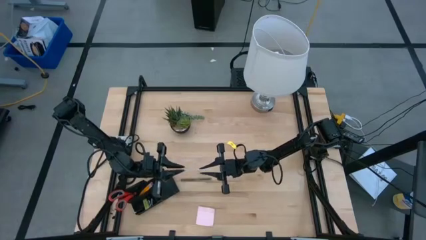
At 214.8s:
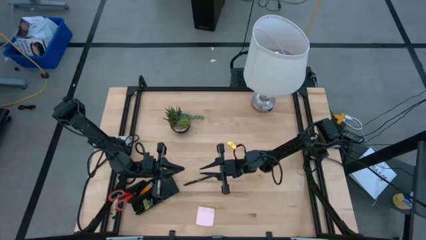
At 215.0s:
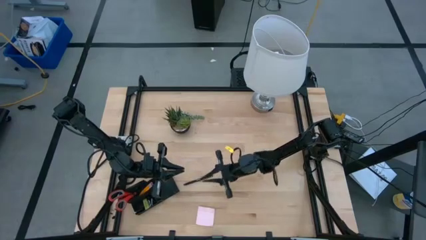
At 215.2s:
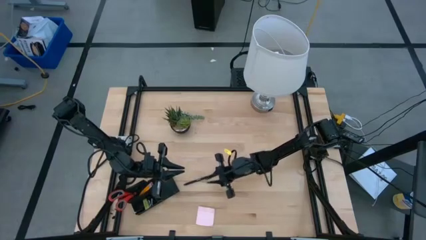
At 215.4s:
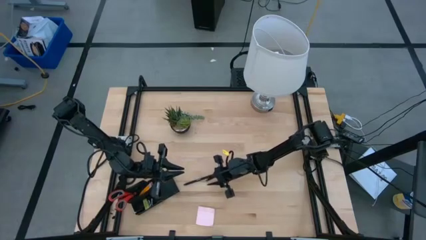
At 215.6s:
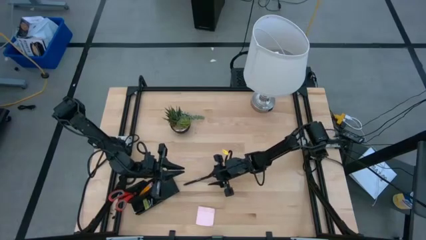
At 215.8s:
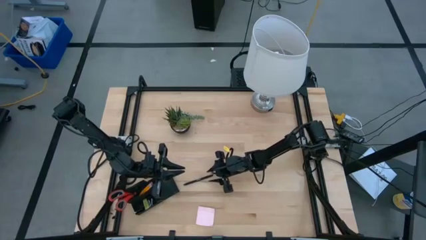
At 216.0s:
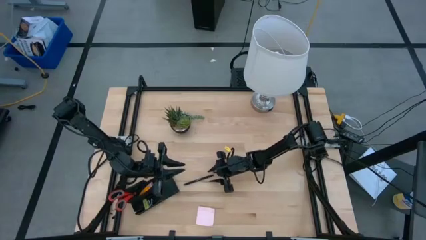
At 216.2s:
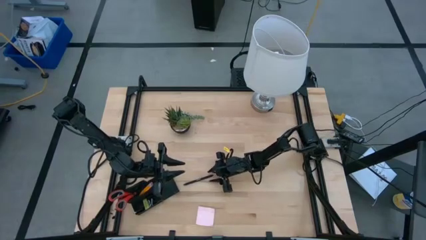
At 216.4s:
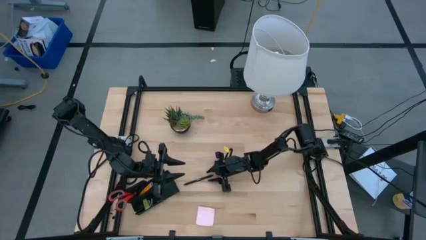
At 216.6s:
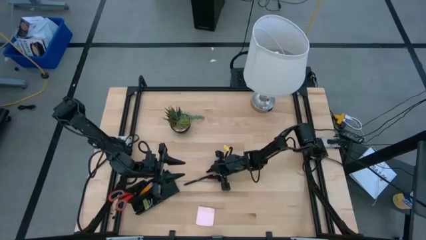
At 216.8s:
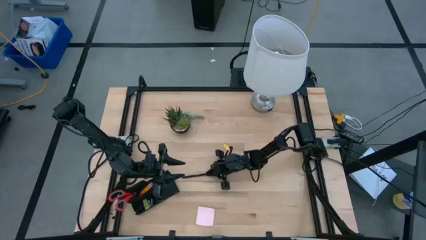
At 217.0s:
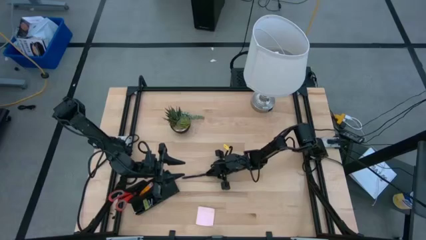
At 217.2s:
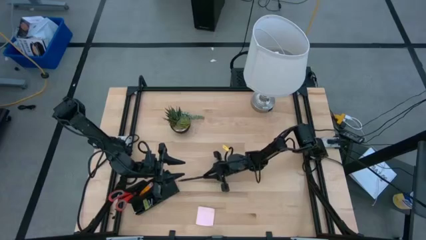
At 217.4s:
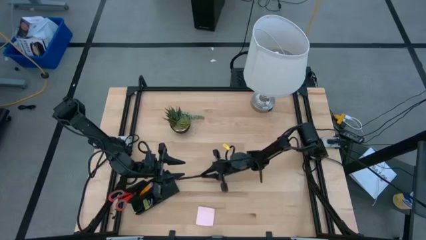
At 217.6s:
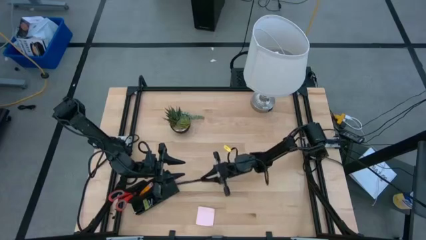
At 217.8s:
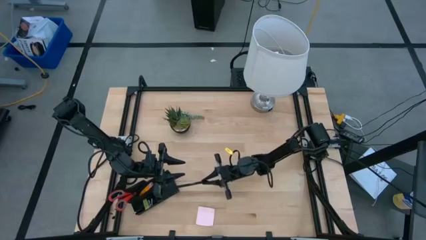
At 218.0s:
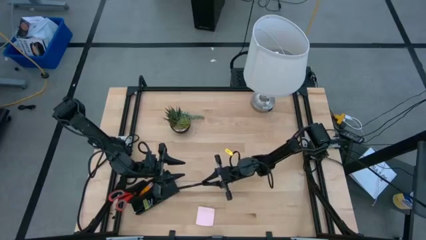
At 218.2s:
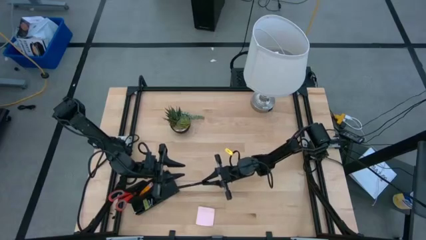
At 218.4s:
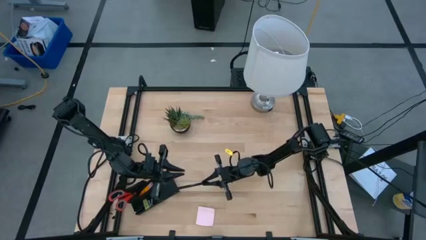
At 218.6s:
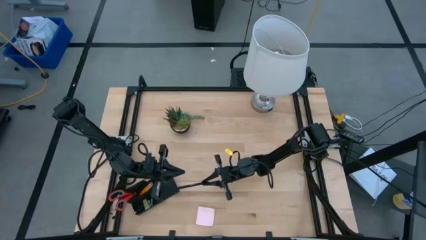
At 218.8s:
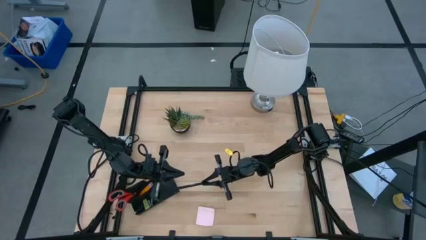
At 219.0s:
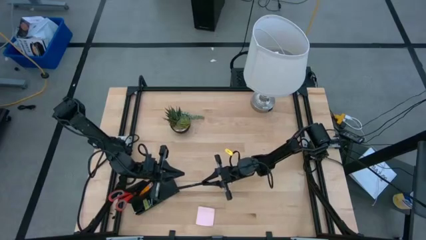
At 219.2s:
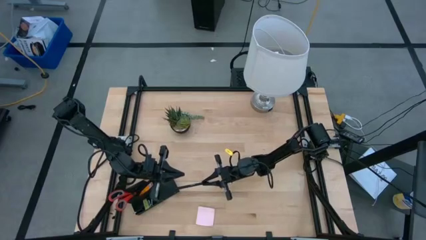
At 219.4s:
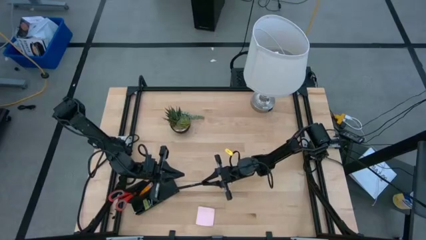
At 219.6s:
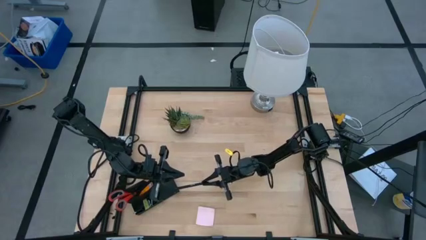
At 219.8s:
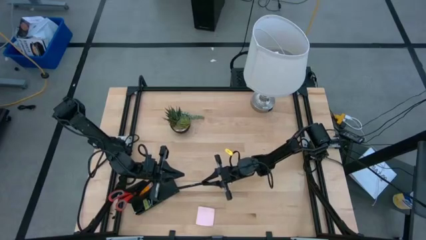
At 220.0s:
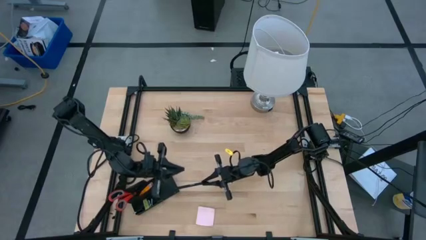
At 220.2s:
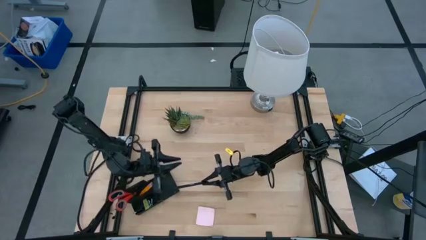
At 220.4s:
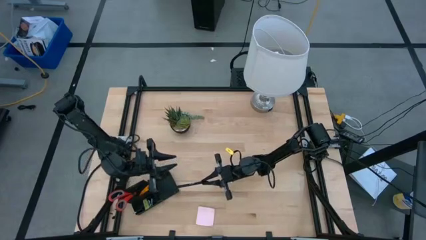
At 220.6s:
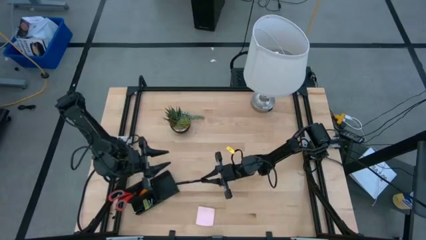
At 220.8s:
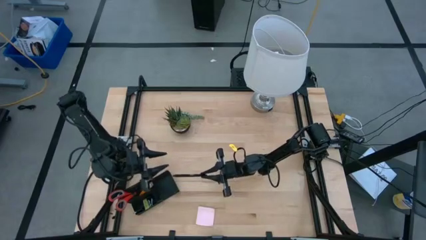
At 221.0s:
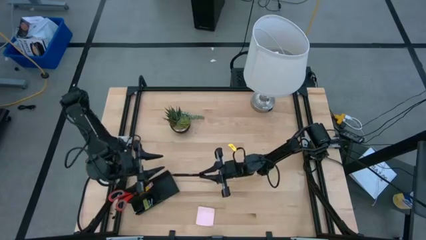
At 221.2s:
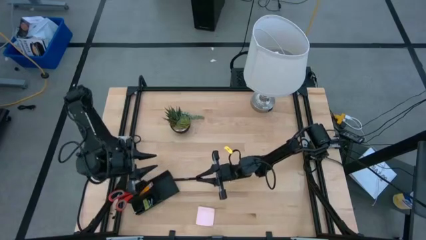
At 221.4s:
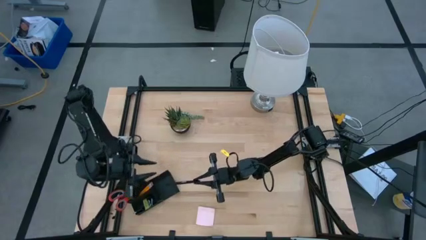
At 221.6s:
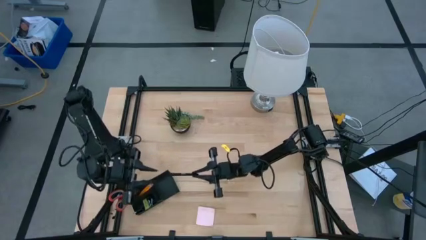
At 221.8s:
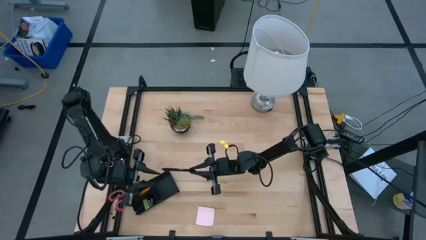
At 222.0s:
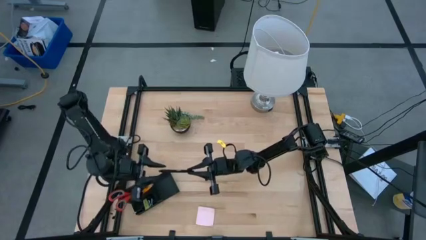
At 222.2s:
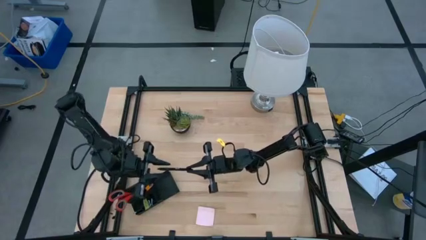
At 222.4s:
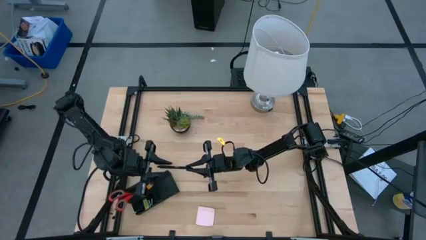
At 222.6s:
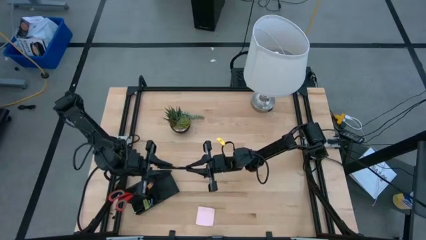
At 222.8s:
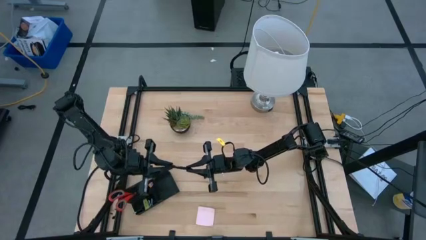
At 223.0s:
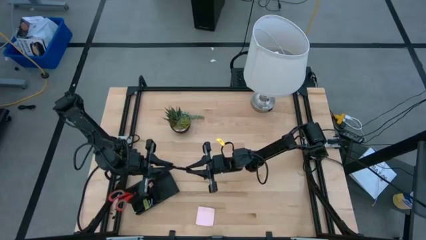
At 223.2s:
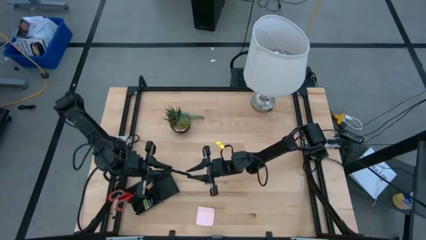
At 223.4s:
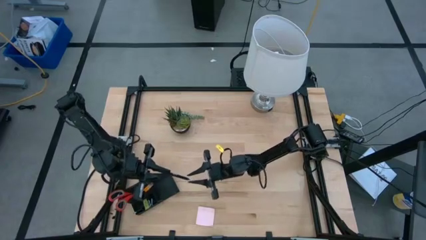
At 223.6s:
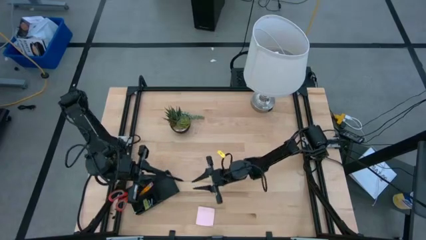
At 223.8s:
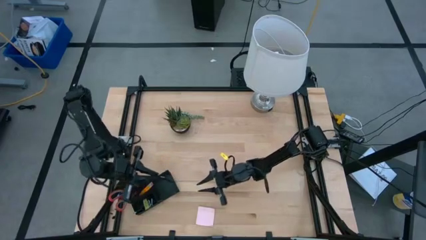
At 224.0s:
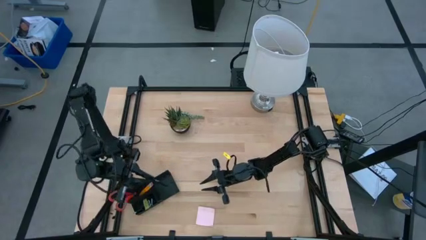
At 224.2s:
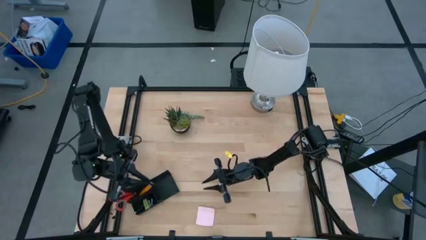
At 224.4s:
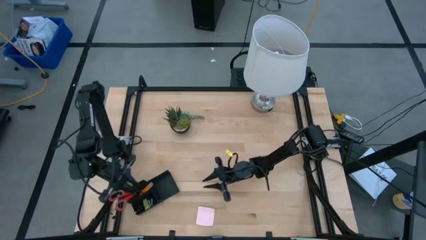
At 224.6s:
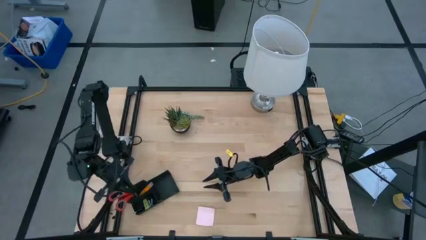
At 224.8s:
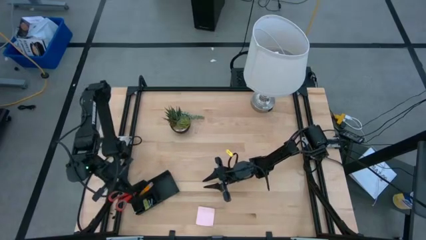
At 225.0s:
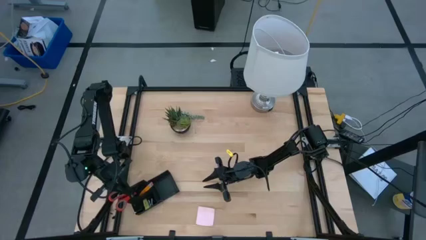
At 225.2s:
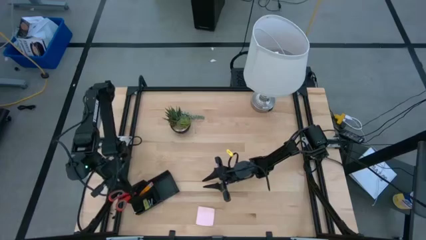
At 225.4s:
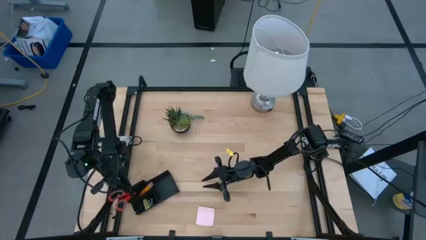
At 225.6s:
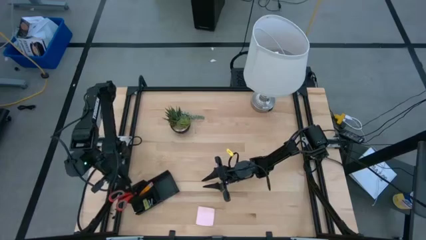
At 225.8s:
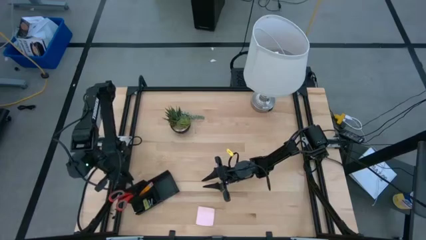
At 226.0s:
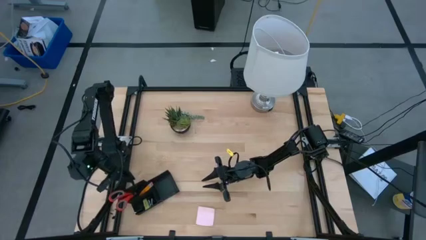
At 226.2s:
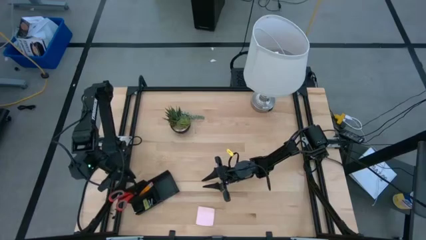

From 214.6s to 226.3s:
Task: Pick and place office supplies into organizer
Put the pen into the top left section of the desk organizer

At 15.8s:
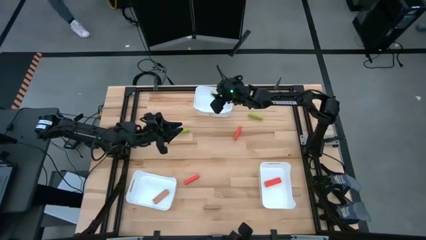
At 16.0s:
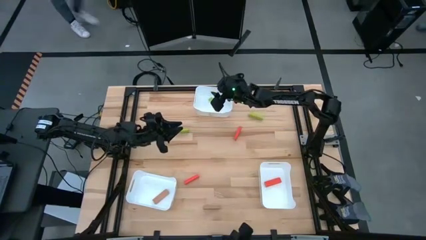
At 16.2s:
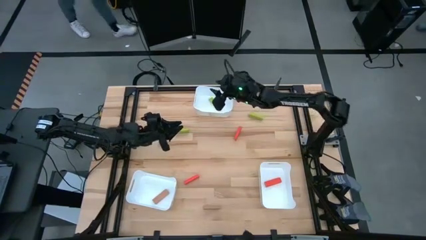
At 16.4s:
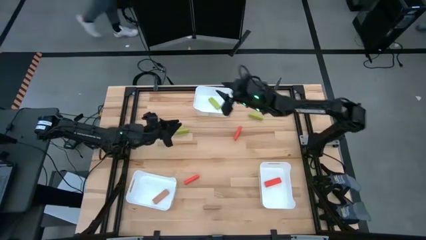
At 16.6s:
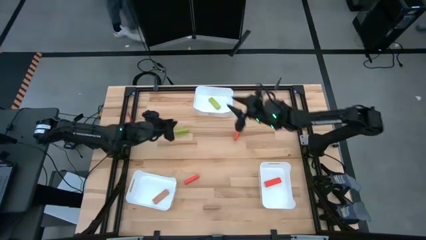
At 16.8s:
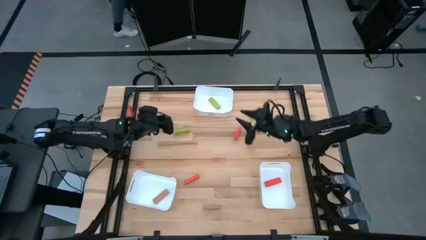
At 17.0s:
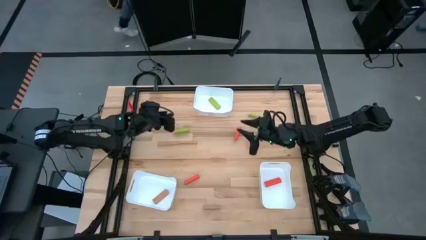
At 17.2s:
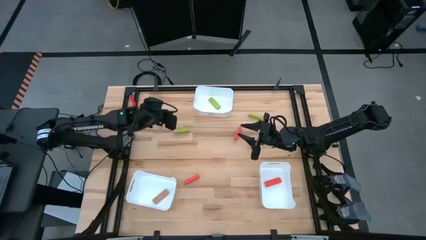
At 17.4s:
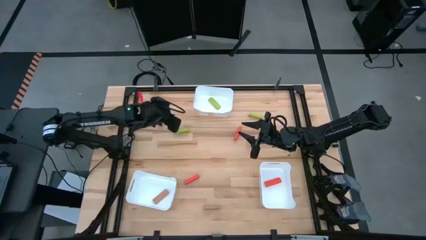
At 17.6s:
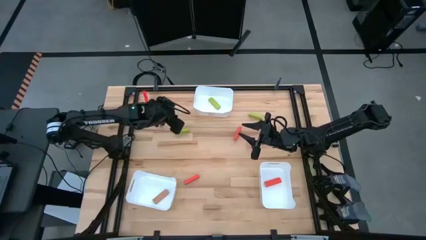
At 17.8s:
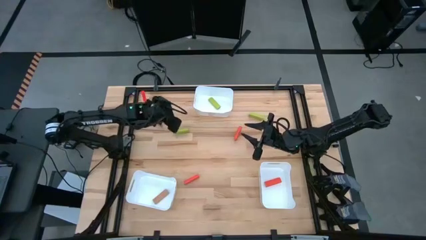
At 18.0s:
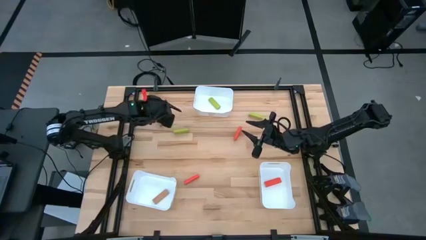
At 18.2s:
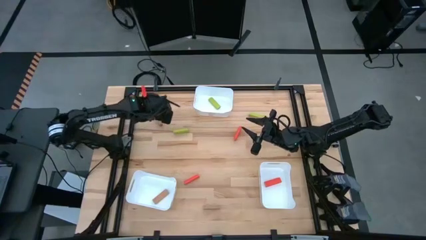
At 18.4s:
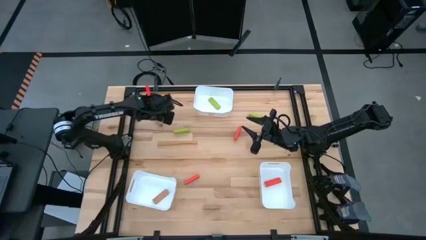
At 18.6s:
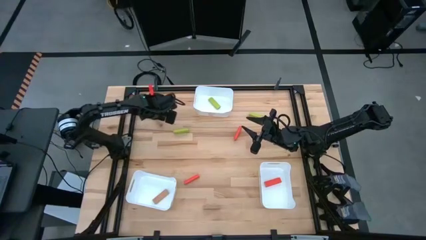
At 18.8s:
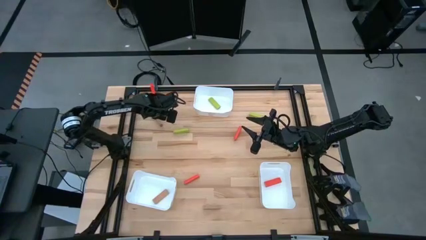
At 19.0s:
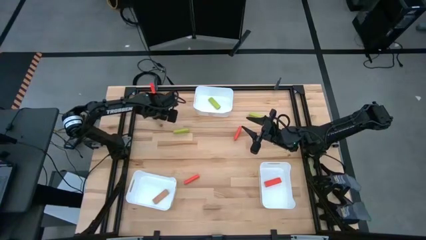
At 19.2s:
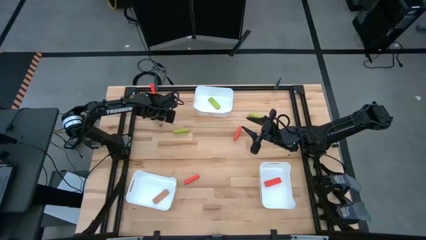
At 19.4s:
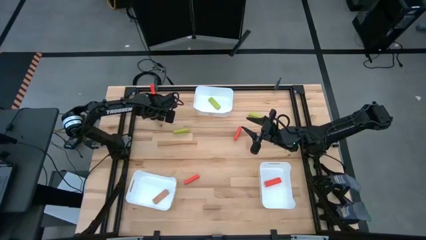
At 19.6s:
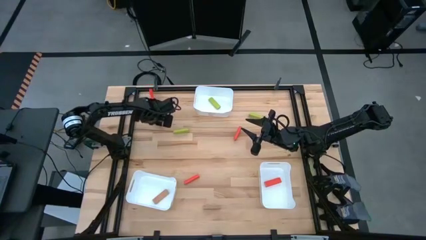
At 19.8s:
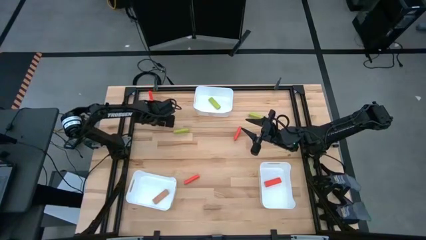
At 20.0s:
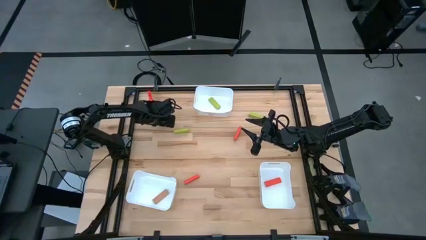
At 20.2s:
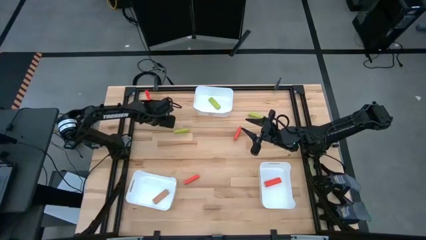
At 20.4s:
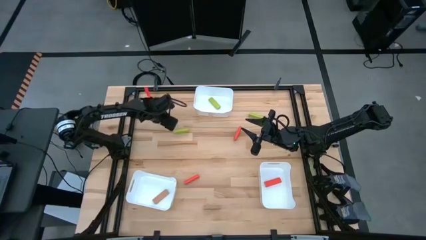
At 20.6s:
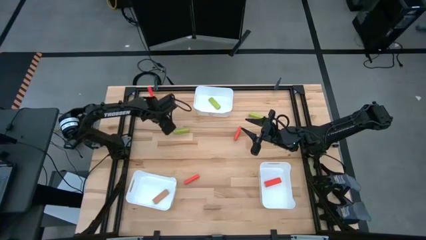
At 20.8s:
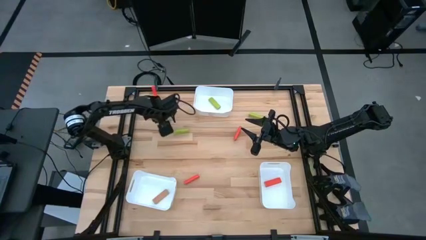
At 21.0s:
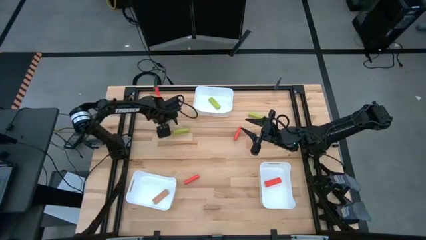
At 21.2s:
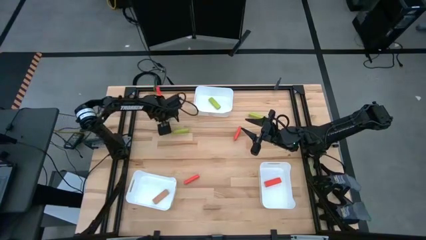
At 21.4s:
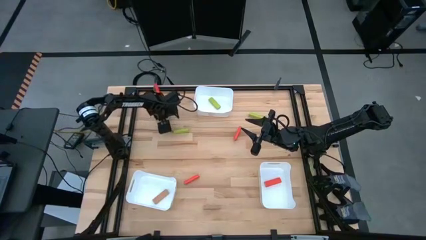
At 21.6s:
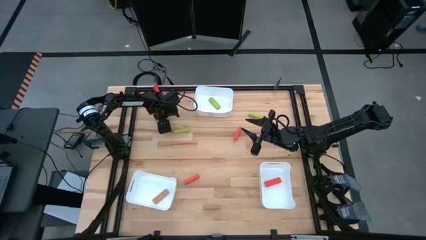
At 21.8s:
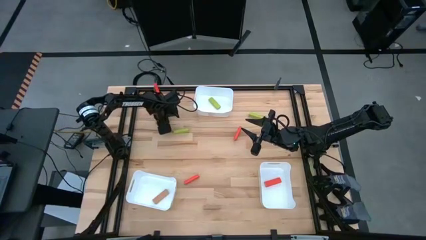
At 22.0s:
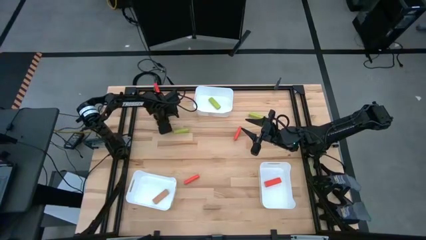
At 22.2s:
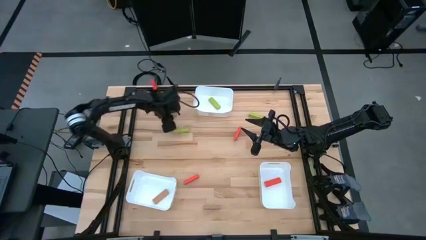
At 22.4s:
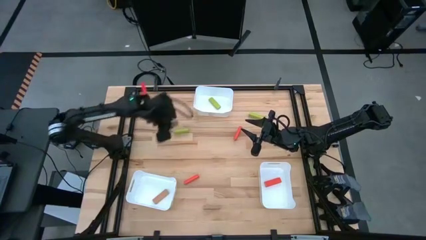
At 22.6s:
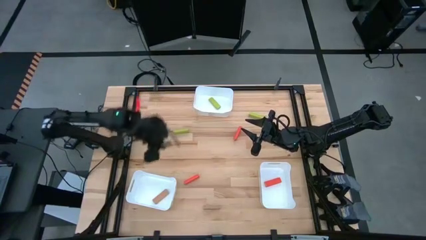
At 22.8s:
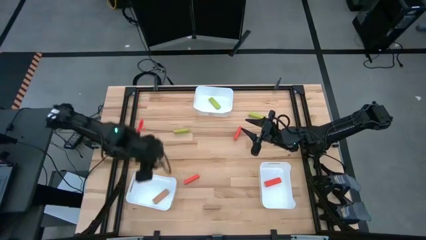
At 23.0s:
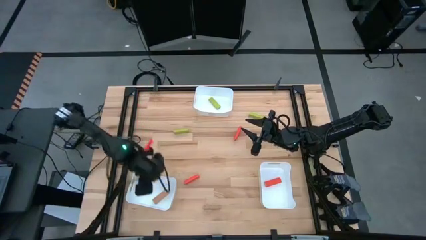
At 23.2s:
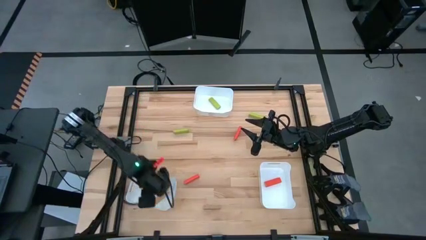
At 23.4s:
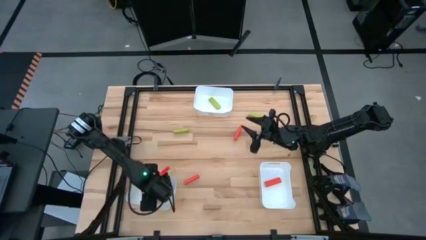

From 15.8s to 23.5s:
Task: Sort blocks
Put the top brown block into the bottom left white bin
